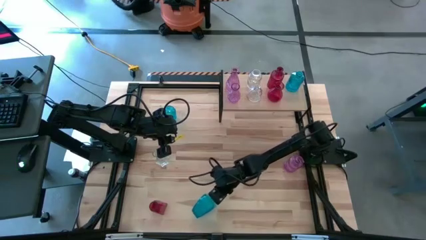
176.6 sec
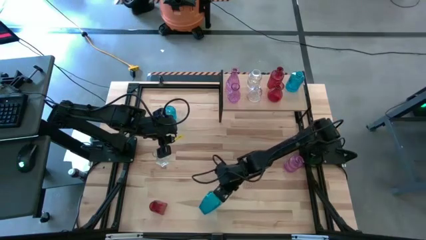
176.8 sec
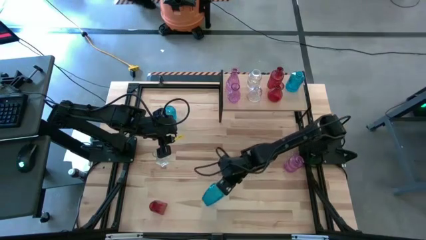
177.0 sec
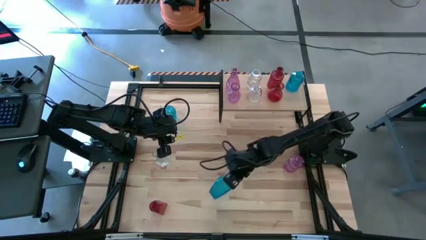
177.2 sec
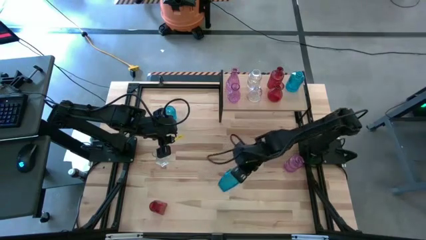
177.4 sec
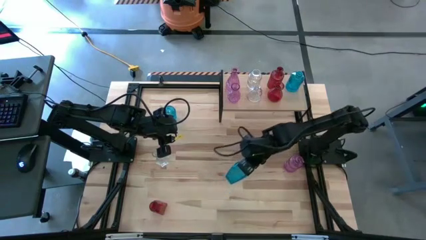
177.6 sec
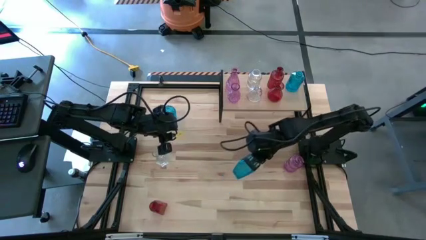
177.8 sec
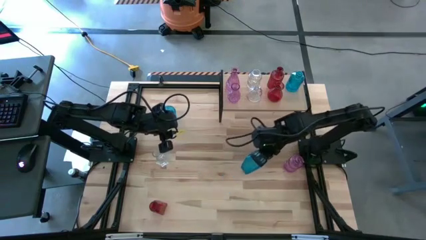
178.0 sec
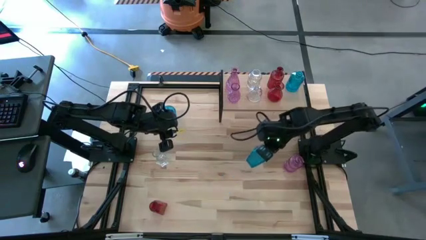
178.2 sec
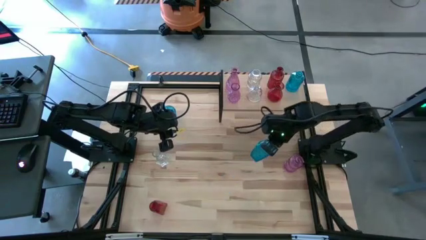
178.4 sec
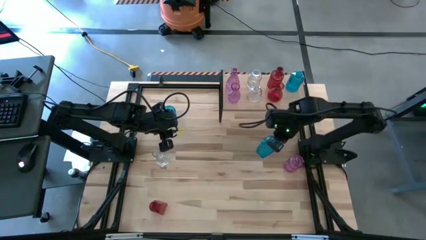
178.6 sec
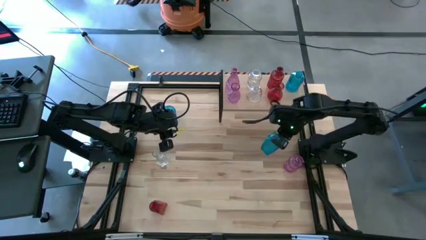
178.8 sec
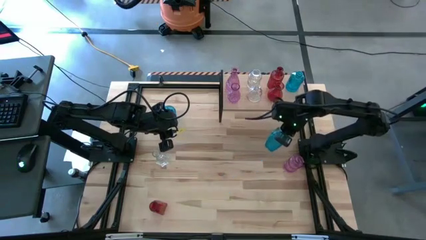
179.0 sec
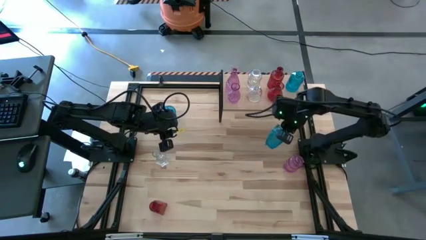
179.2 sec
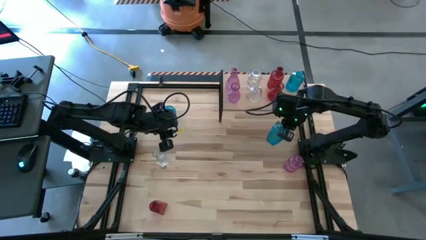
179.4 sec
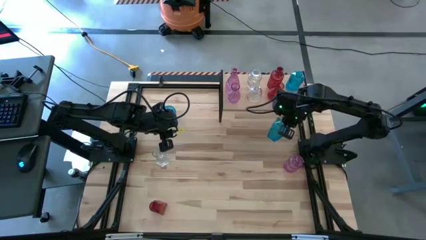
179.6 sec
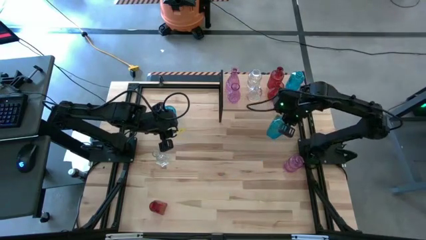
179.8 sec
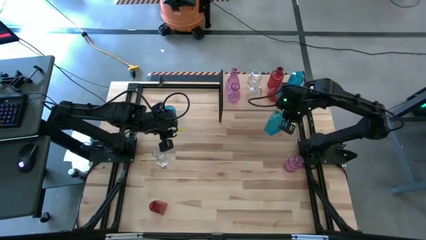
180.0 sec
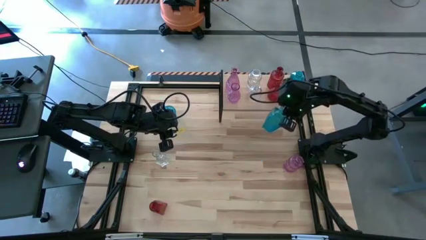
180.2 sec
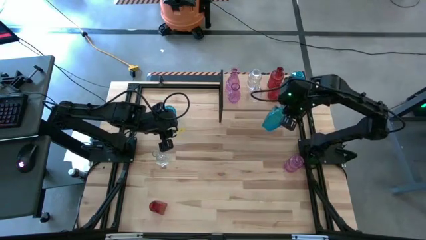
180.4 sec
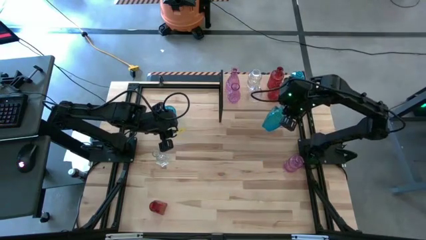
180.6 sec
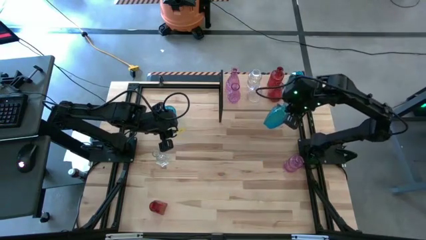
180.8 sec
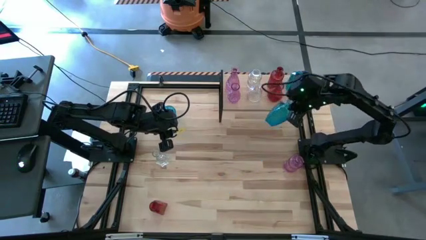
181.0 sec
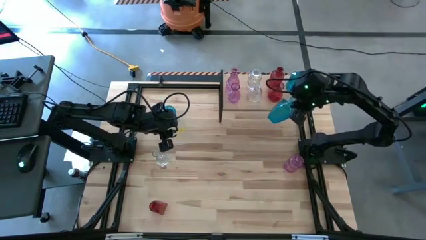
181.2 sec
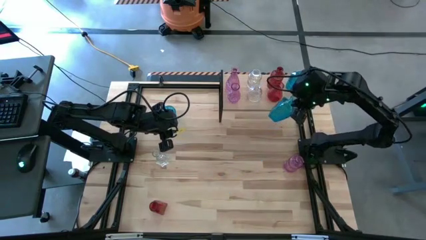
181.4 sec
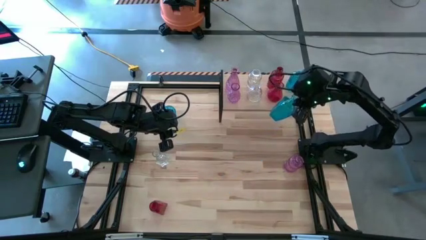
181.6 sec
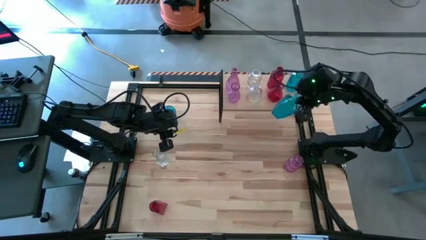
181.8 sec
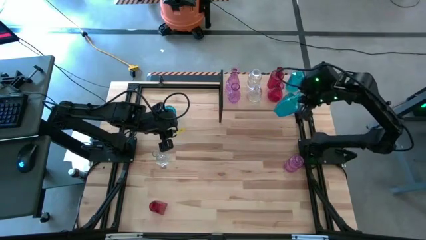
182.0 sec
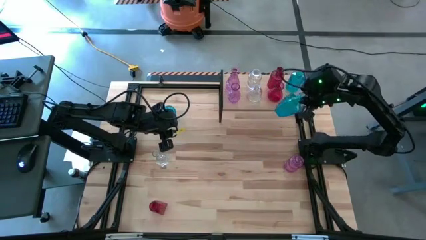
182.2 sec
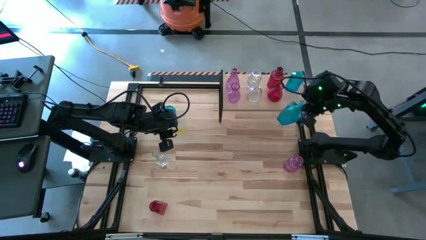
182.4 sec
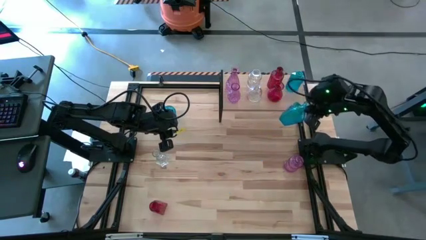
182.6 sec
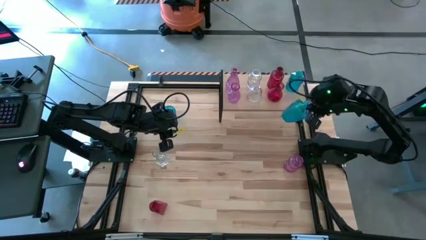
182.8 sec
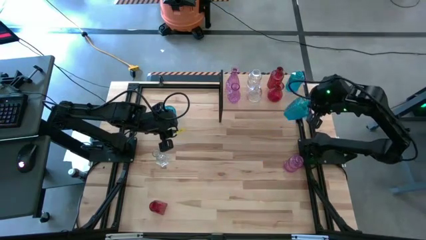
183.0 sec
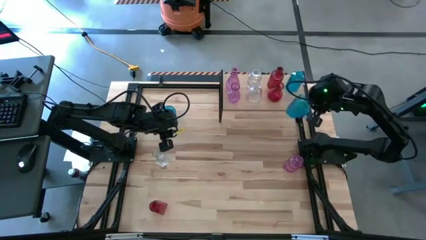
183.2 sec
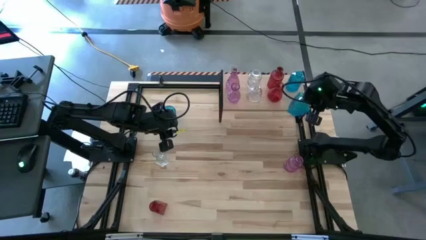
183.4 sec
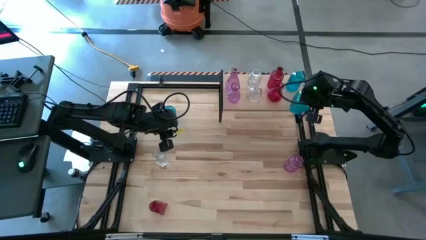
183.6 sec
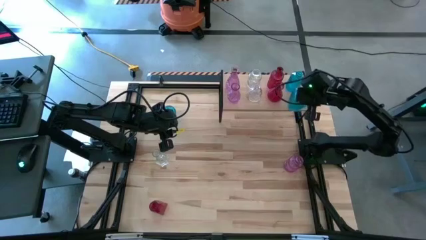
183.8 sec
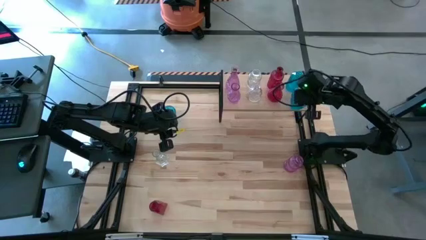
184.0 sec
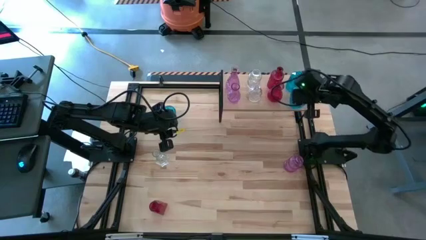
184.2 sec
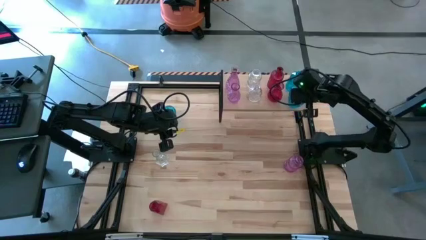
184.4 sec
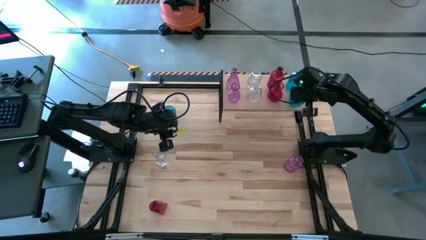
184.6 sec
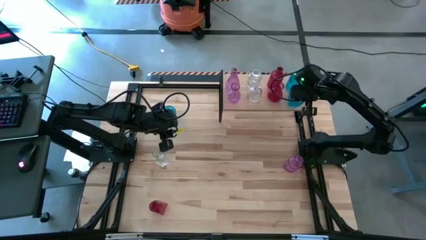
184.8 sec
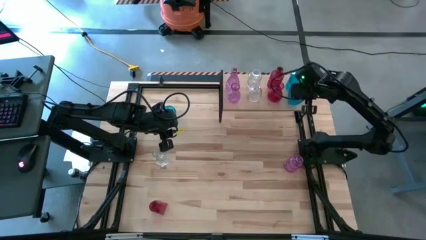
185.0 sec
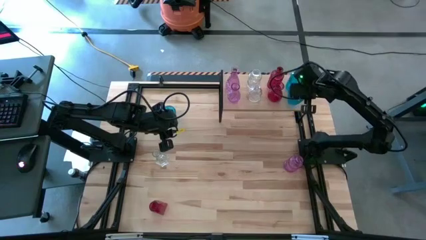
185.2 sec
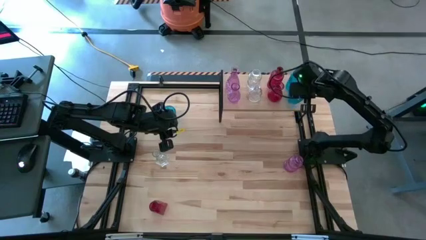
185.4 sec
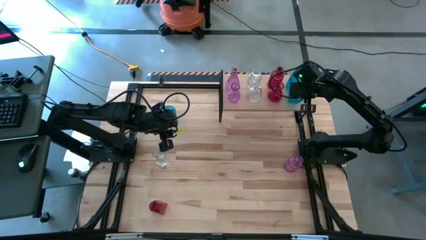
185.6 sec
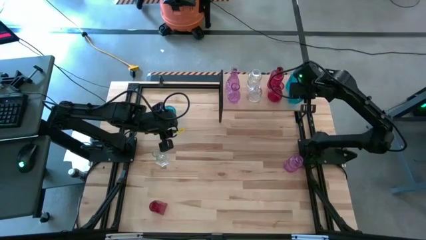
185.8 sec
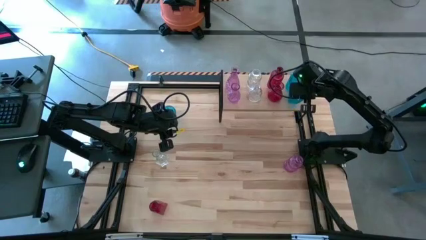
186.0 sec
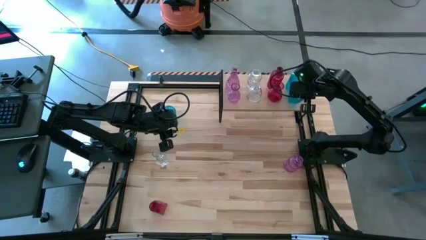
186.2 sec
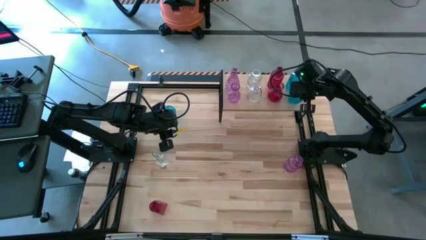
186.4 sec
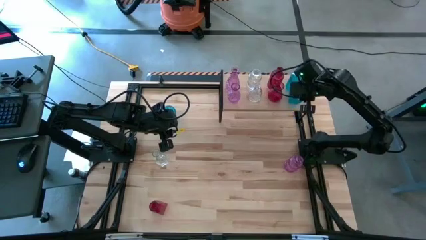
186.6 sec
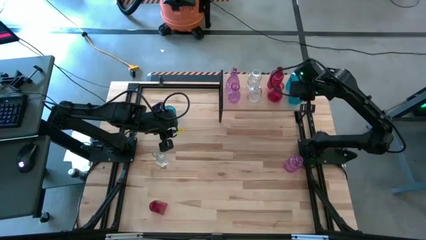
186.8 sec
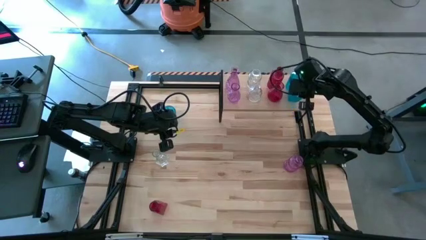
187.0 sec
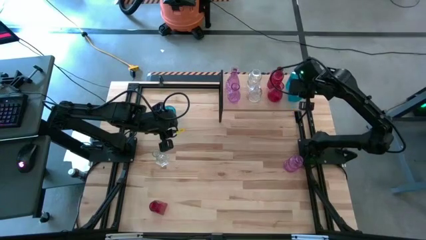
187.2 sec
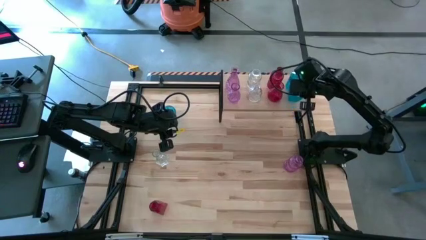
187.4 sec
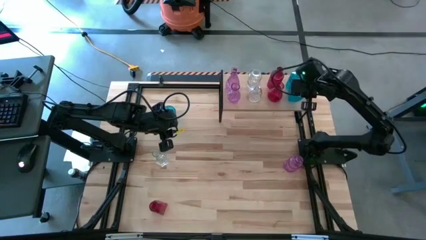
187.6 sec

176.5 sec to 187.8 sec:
Task: sort vases onto shelf
Put the bottom blue vase on the shelf aligned with the other blue vase

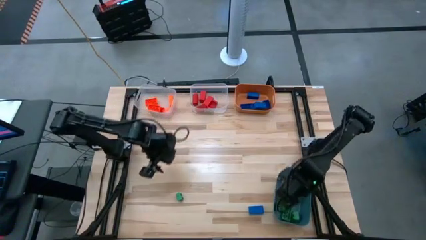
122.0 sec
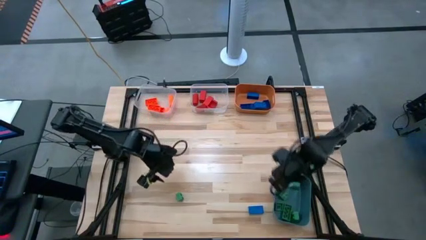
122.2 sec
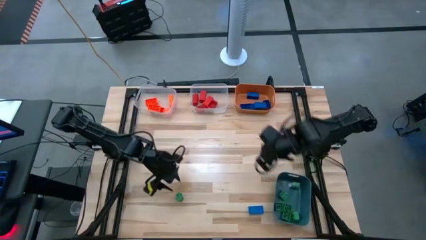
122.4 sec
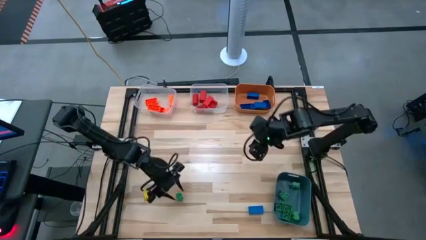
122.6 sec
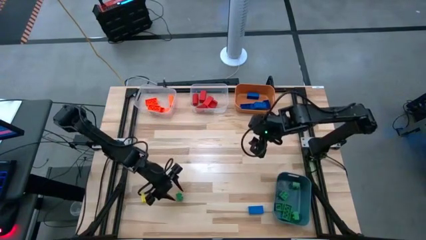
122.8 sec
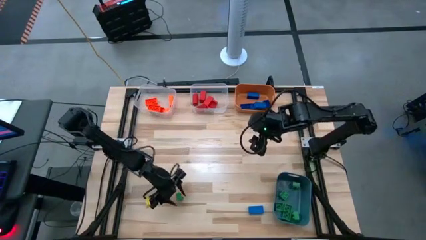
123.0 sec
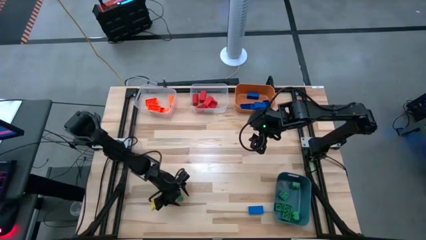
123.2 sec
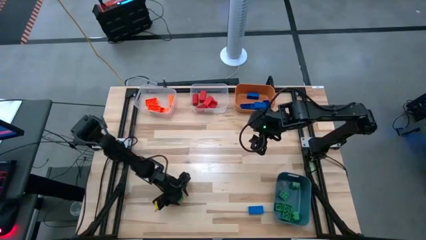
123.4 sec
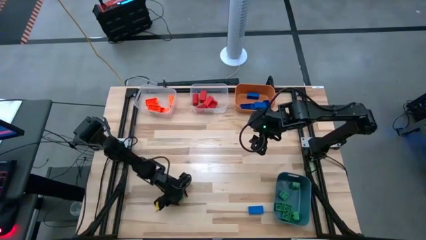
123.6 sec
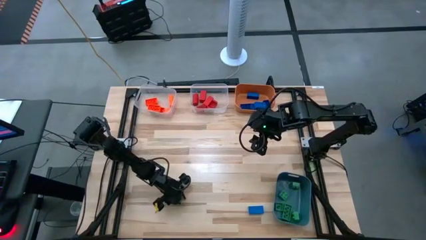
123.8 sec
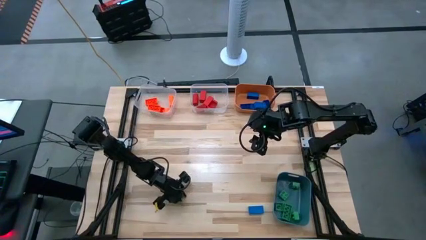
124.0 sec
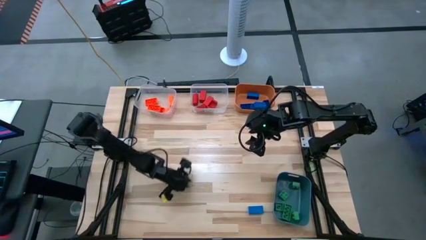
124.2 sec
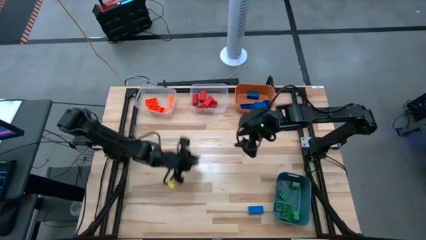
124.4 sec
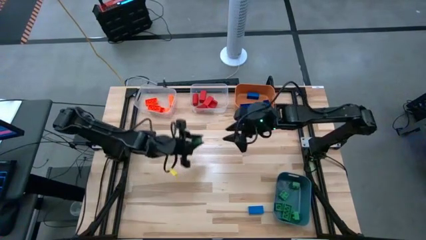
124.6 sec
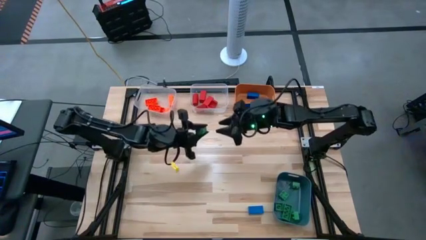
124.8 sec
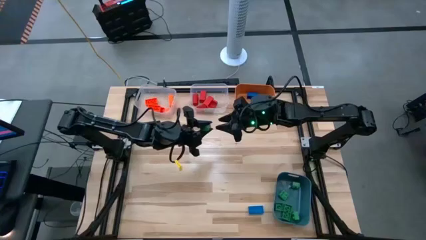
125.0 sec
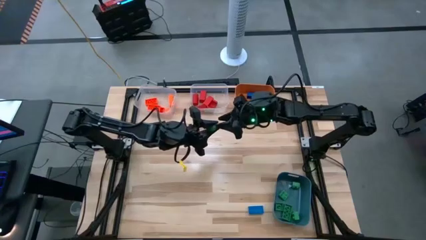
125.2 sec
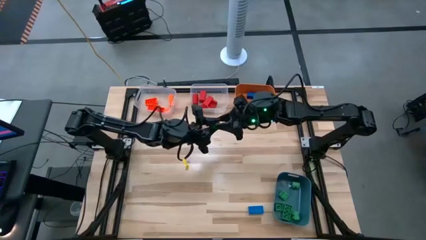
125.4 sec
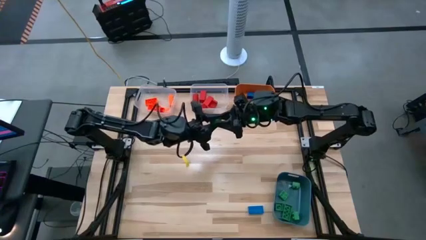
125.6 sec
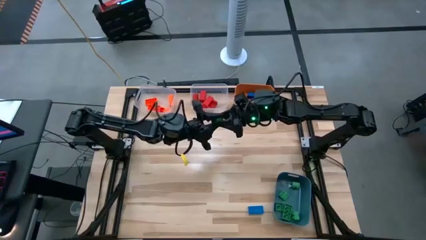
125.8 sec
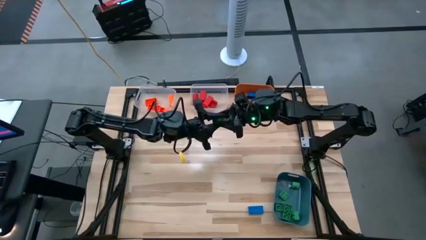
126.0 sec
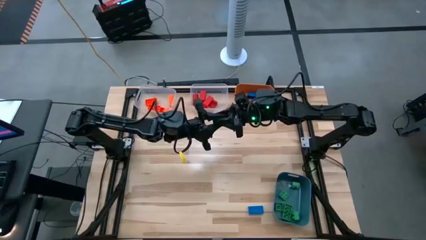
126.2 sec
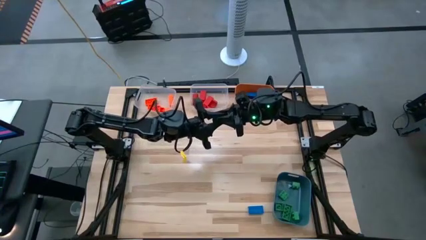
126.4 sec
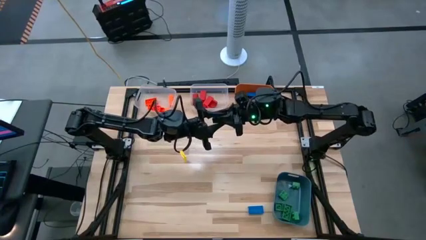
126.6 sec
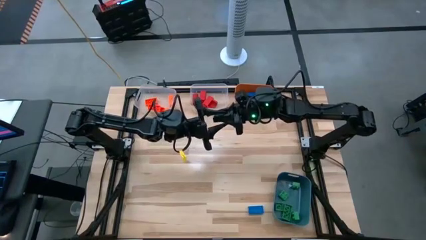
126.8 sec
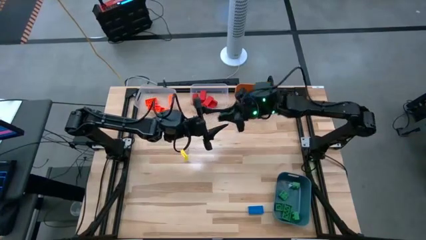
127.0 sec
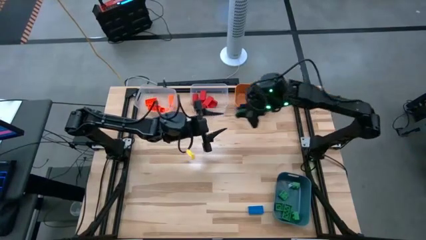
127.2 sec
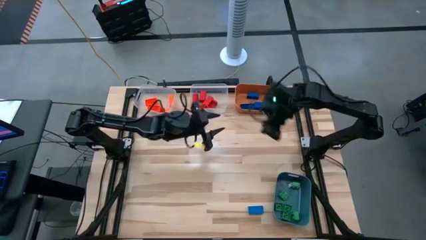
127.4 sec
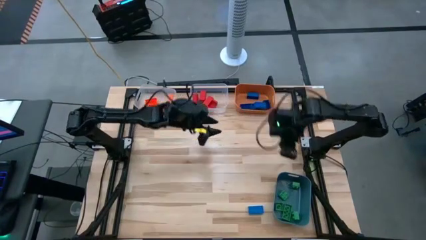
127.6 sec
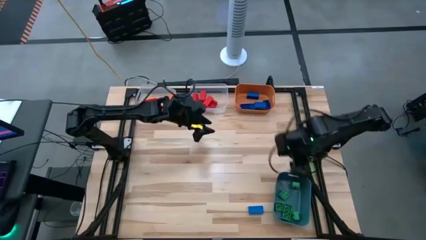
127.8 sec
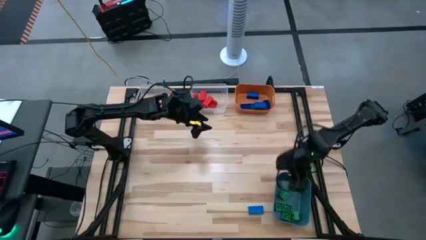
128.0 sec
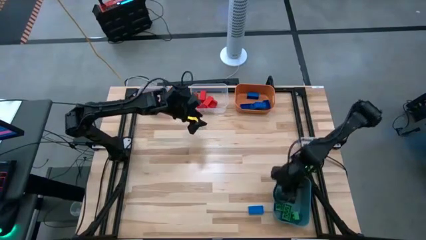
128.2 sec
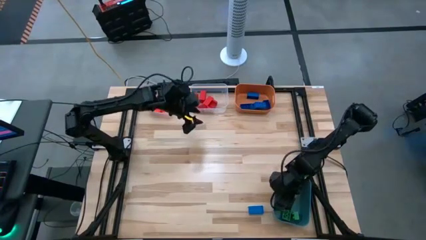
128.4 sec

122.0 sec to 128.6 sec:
Task: Sort blocks
Put the green game piece into the blue bin
